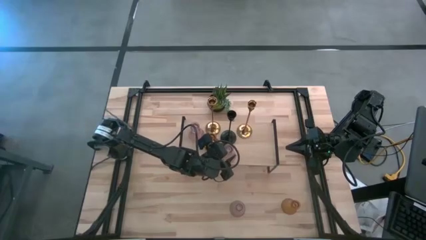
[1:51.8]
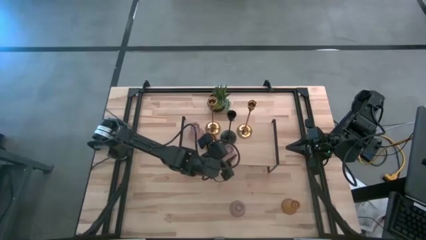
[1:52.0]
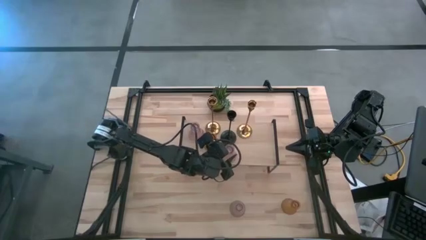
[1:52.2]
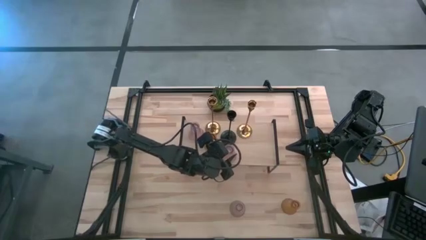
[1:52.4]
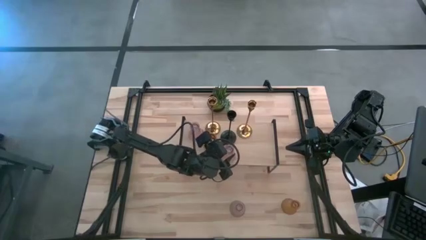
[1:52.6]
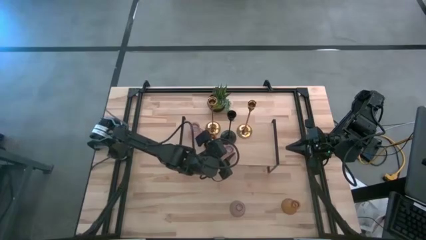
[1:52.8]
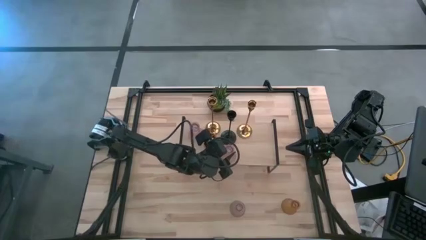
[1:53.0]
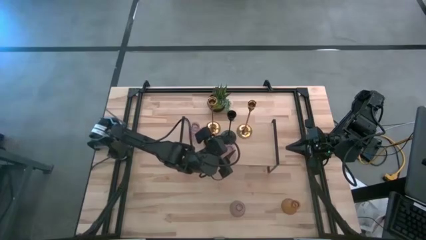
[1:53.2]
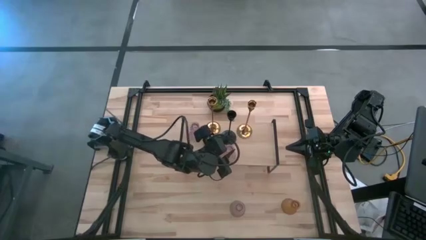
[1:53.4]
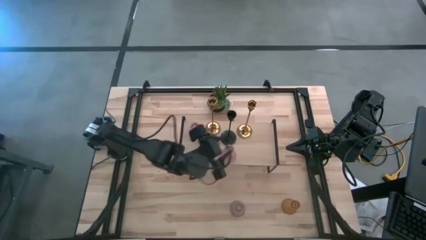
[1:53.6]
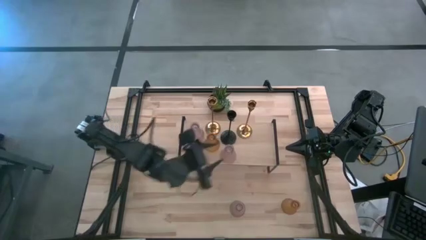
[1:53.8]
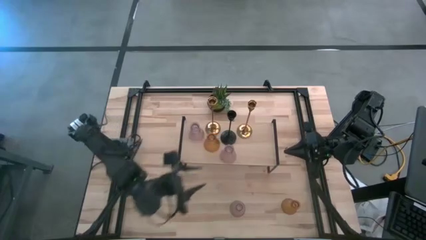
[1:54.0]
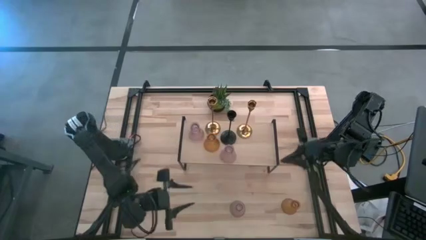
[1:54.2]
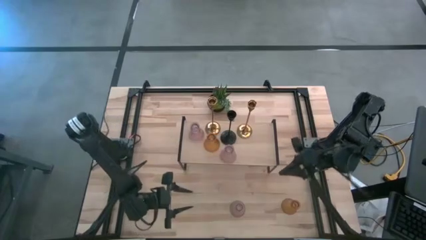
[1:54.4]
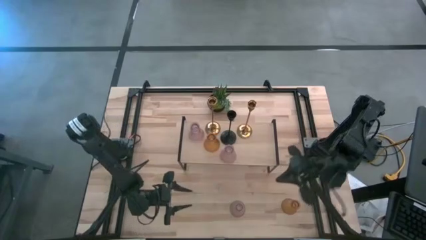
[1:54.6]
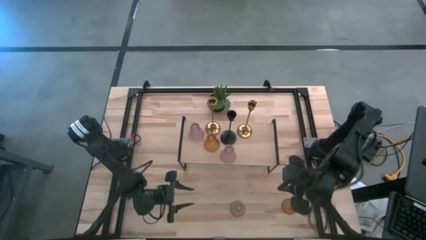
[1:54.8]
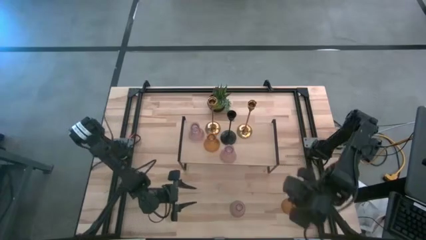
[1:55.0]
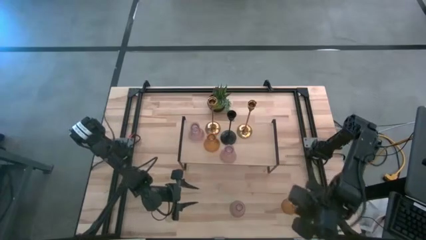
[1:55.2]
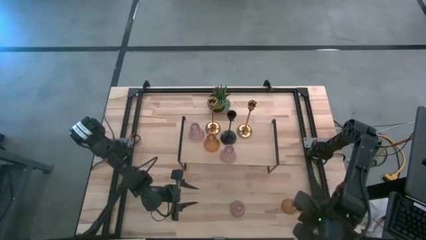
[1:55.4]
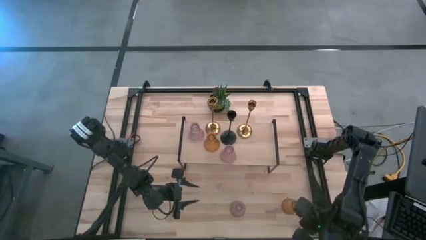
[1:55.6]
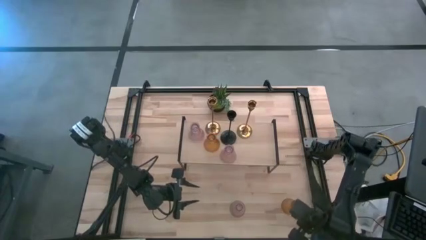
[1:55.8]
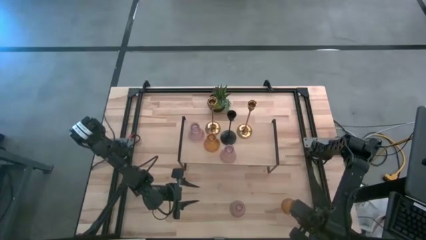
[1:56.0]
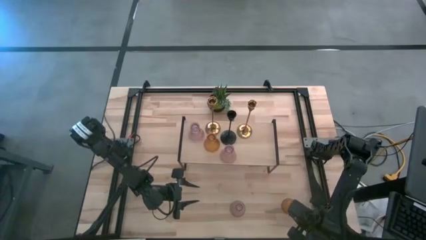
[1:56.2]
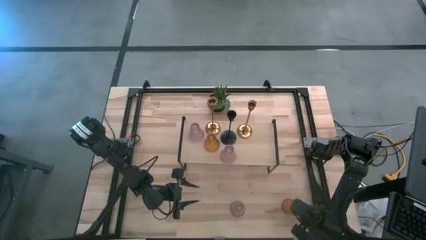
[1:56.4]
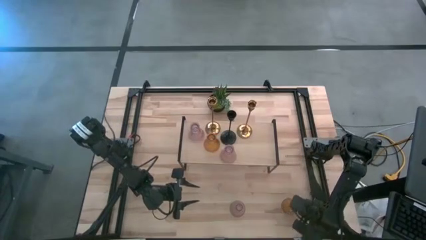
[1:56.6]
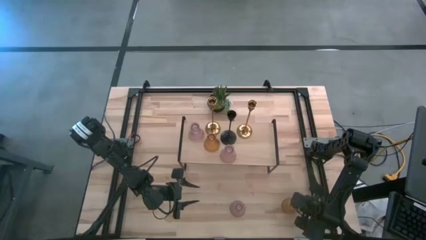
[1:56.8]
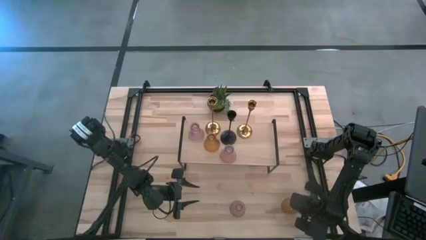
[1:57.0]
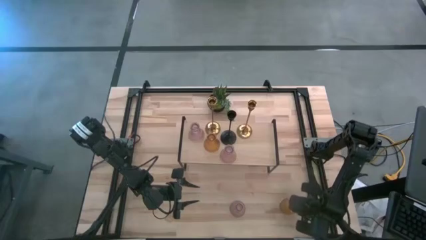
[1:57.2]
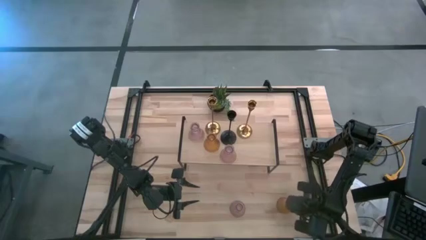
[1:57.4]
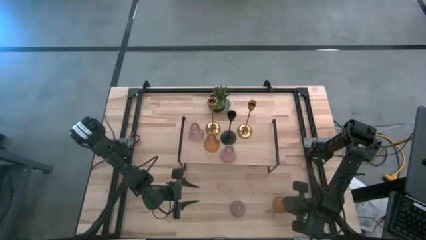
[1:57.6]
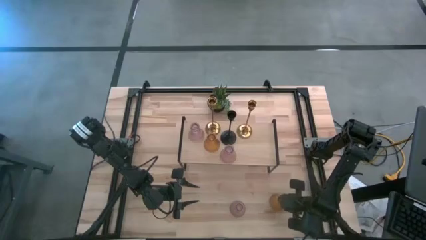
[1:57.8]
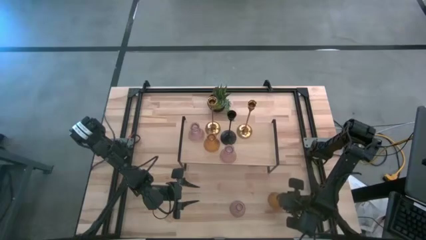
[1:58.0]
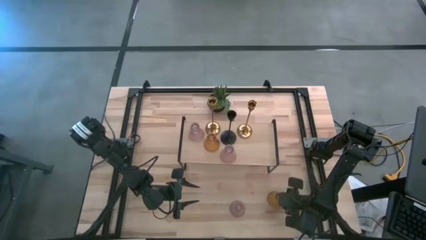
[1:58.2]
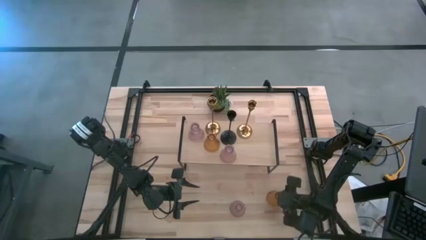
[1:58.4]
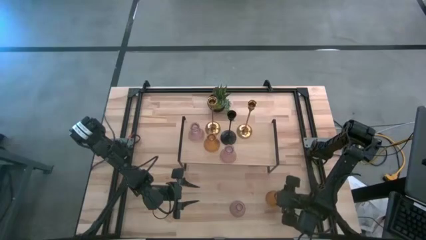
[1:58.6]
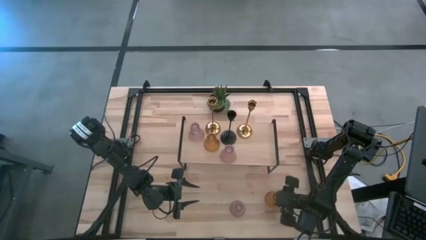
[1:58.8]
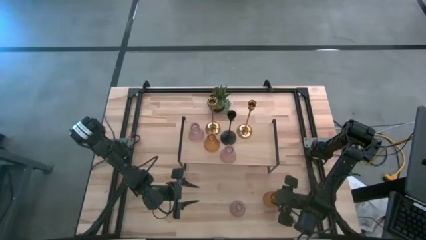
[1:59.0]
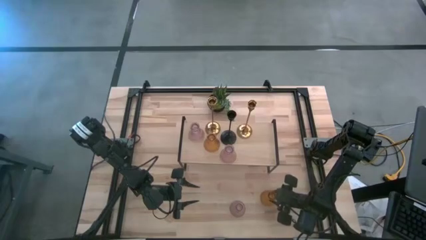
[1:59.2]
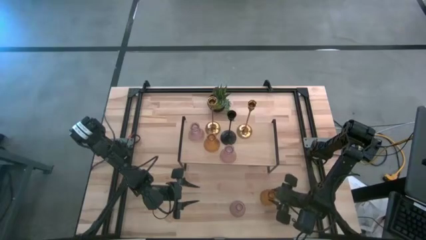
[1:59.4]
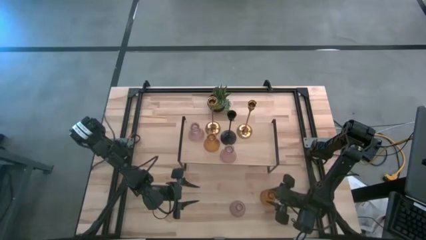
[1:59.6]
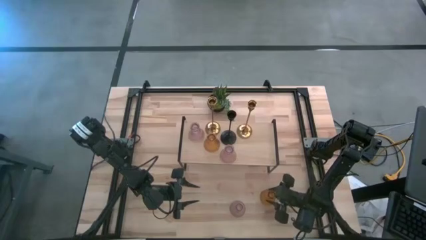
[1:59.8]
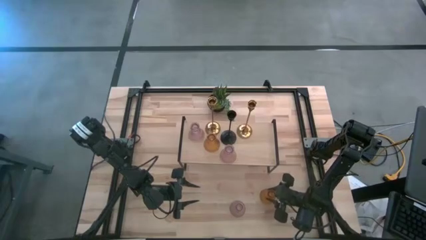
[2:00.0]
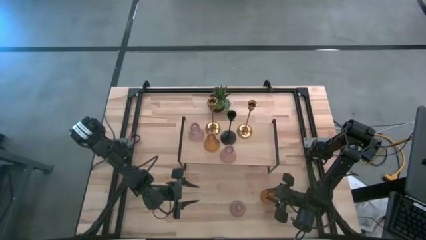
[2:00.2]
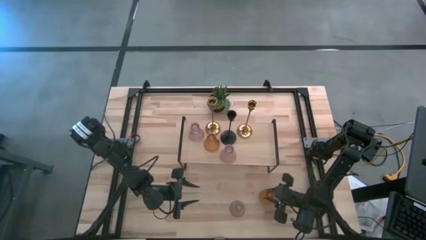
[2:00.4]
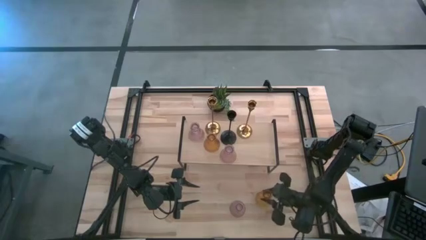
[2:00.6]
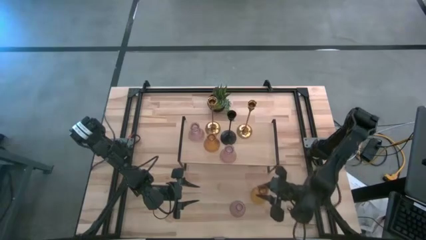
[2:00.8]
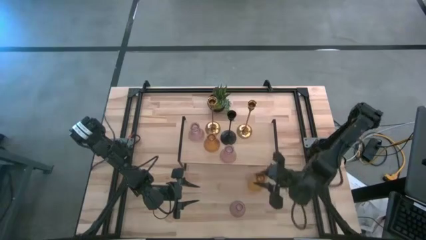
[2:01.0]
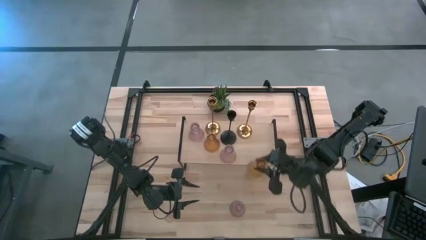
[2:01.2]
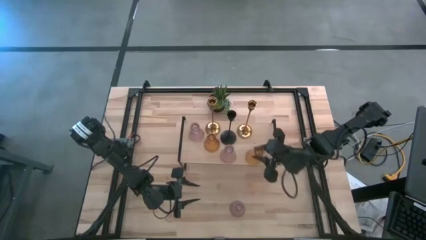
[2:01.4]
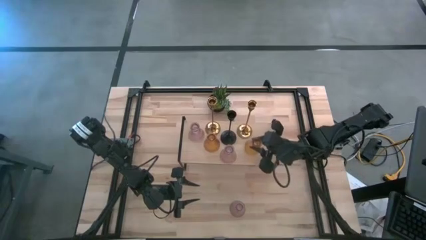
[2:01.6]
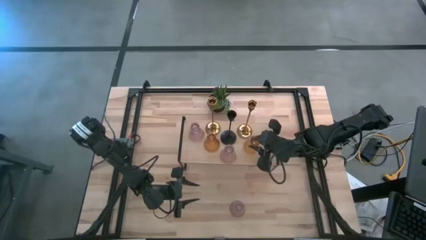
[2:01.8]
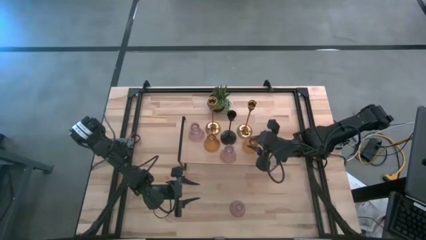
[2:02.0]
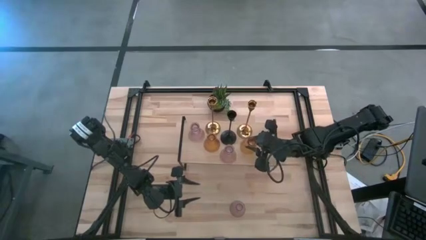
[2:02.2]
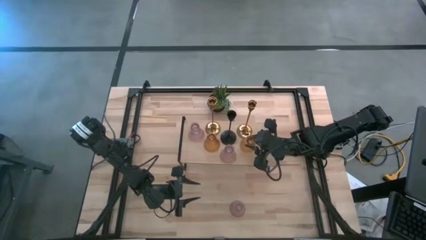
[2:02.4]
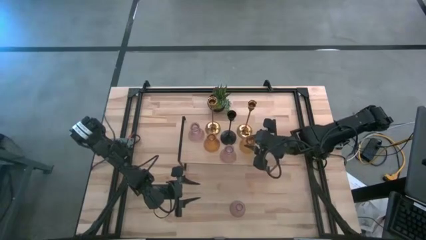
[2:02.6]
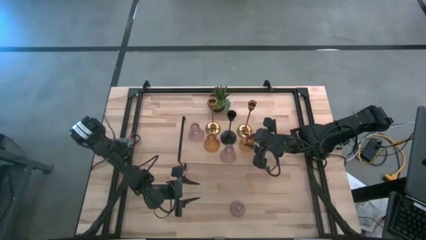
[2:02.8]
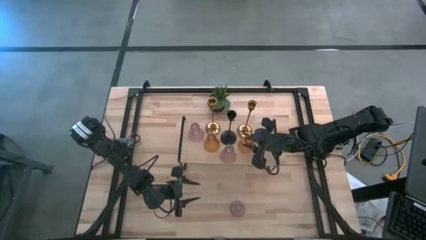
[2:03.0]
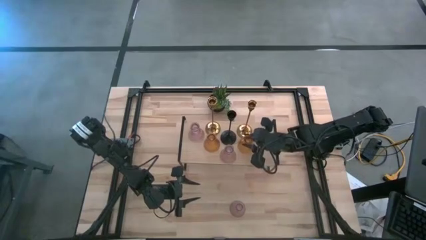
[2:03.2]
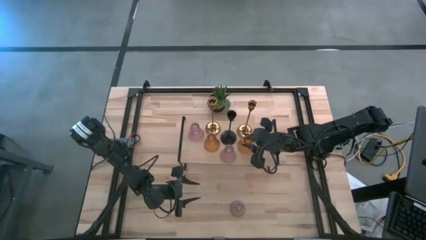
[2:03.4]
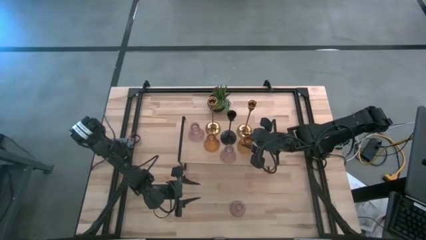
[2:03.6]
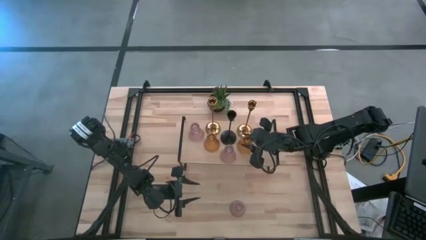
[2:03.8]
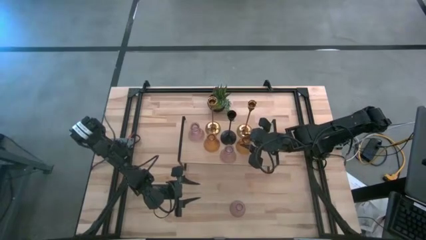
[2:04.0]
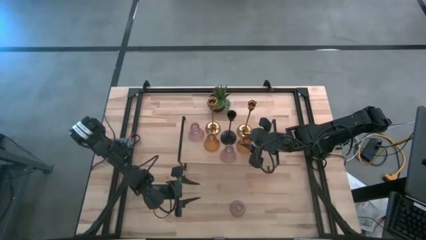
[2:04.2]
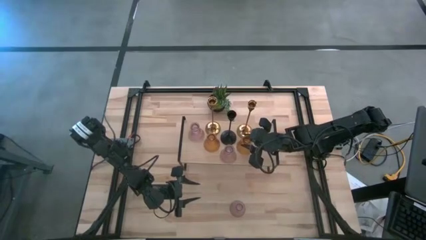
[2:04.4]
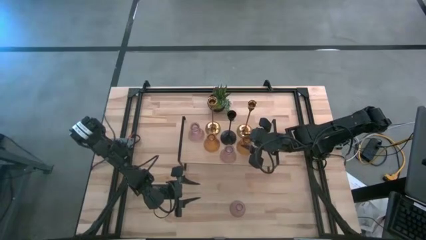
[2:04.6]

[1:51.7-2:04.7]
Task: Pick & Place candle stick holders
Put the orange glass candle holder on the shelf

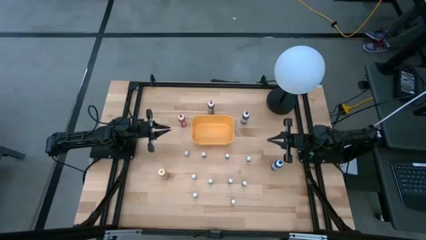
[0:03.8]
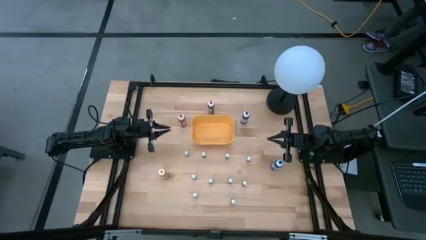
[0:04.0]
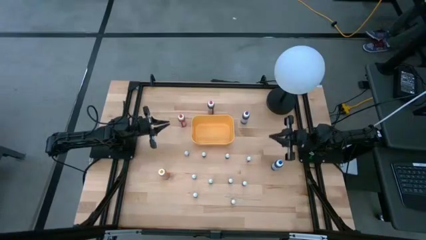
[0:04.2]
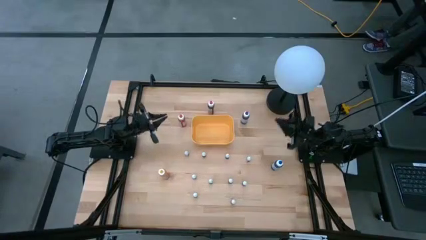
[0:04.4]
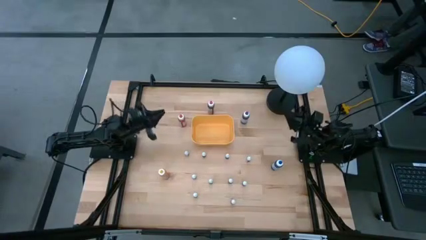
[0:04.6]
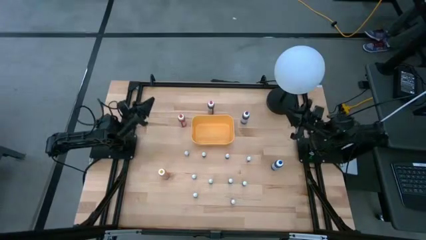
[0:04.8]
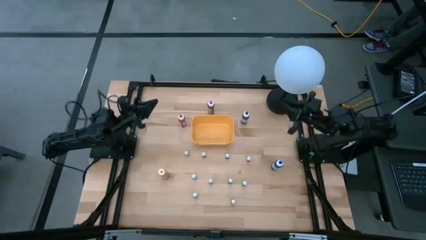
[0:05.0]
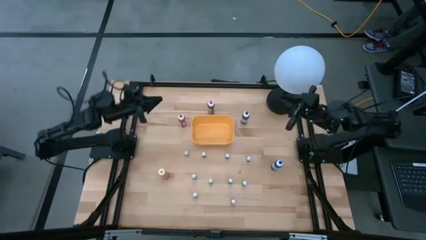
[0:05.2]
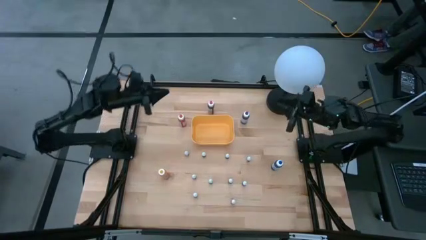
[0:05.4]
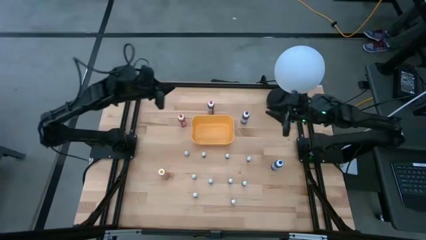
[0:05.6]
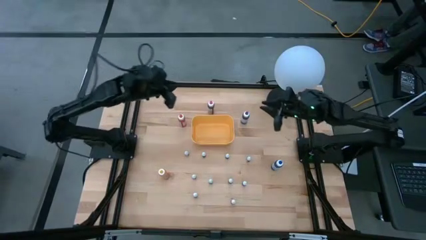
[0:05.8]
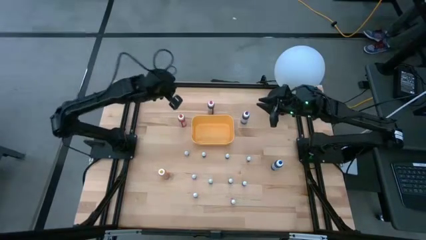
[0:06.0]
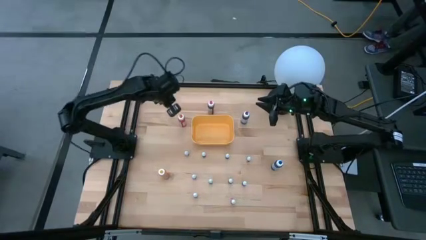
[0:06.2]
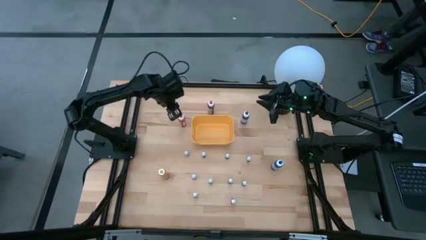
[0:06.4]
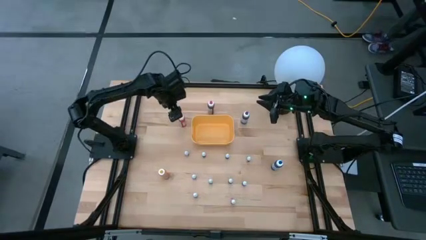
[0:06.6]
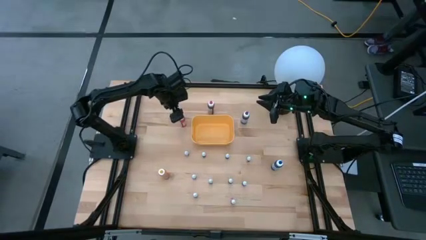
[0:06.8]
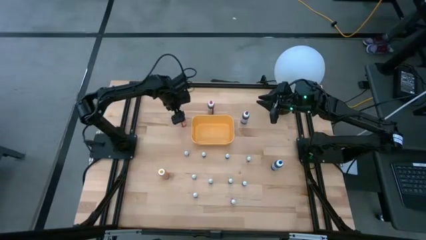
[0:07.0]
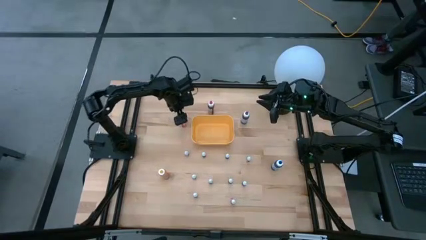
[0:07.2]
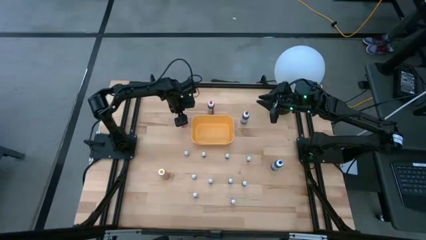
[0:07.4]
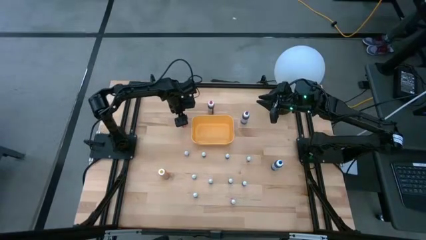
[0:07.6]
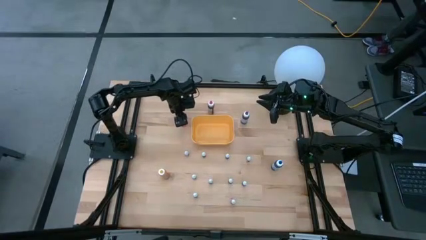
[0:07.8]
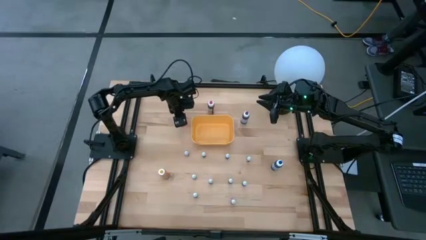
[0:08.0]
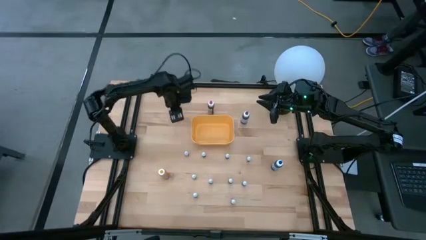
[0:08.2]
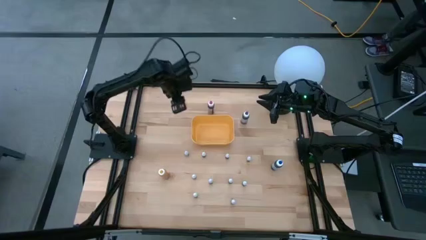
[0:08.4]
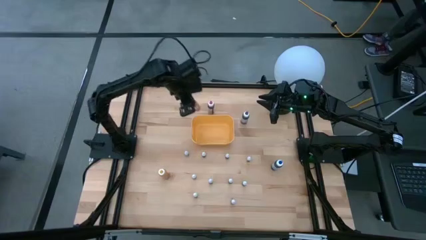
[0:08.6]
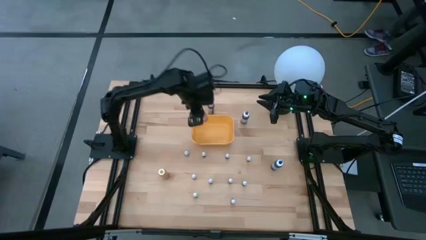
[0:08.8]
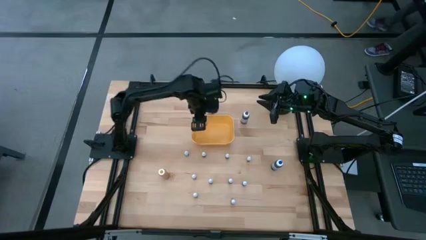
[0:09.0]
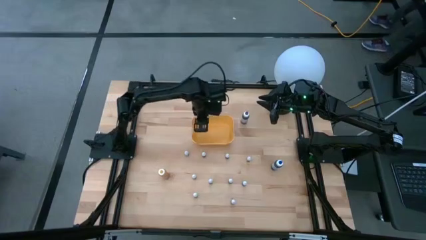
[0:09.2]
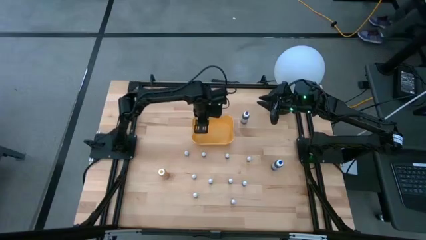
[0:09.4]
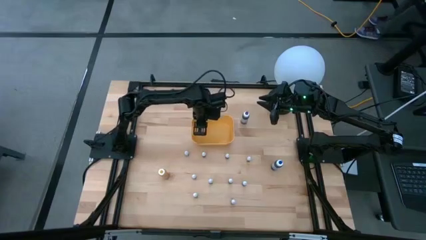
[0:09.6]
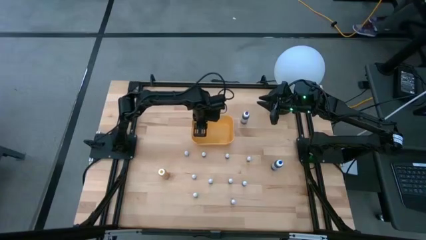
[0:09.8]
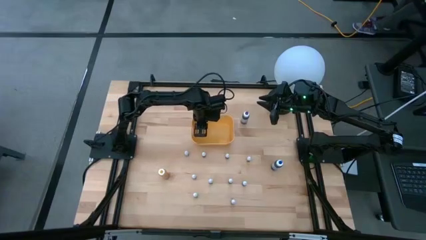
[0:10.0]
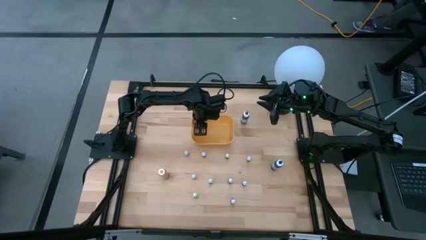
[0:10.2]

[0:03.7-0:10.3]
Task: Pick & Place food coloring
Put the large orange food coloring bottle into the yellow bin
